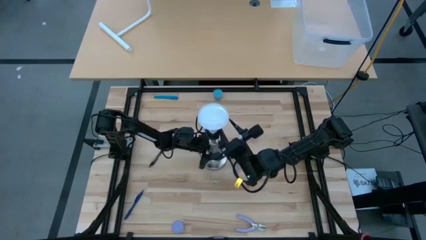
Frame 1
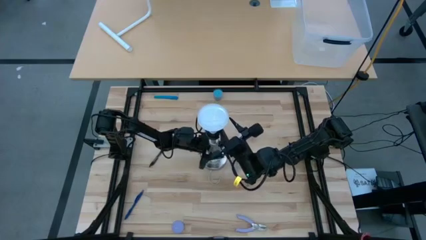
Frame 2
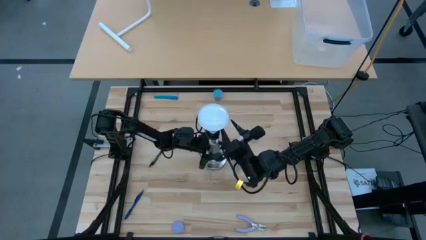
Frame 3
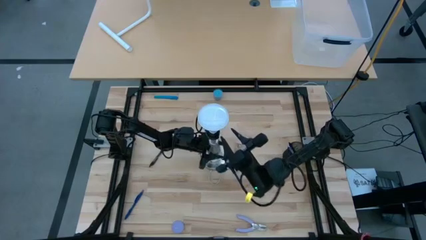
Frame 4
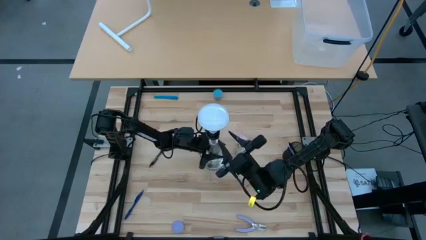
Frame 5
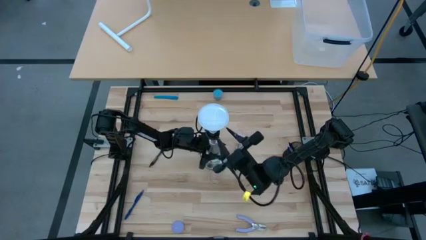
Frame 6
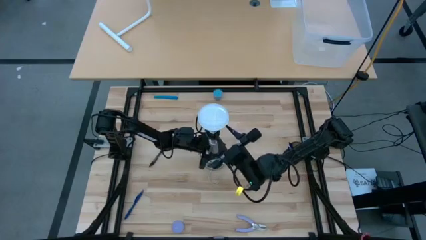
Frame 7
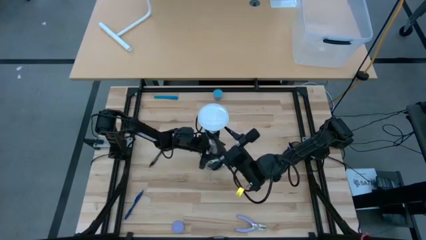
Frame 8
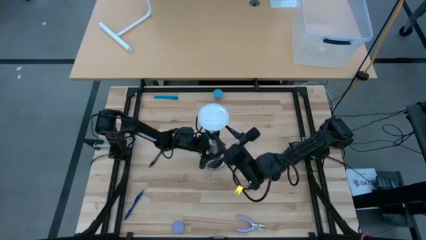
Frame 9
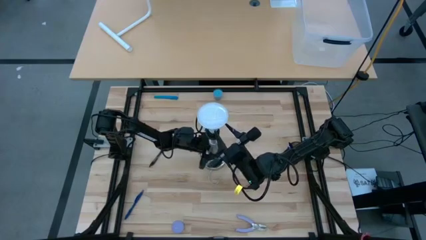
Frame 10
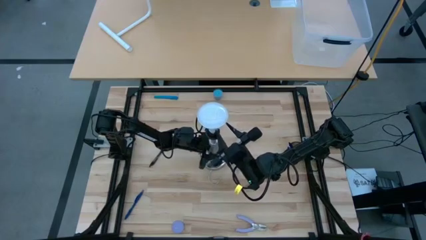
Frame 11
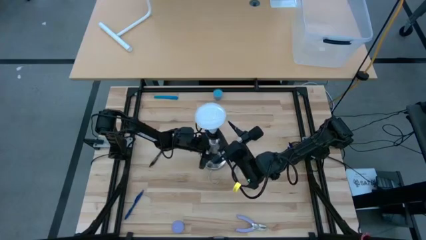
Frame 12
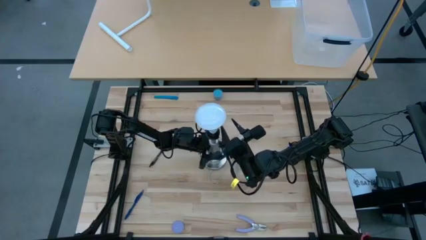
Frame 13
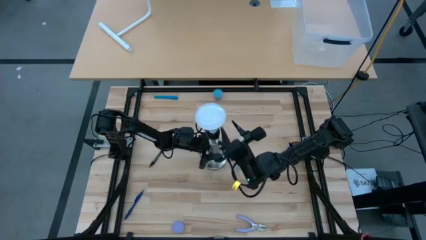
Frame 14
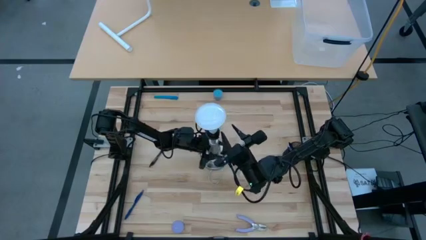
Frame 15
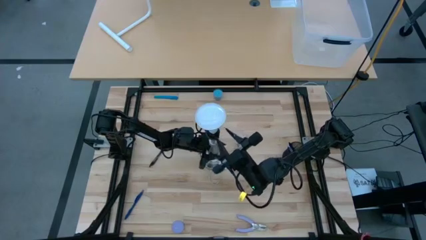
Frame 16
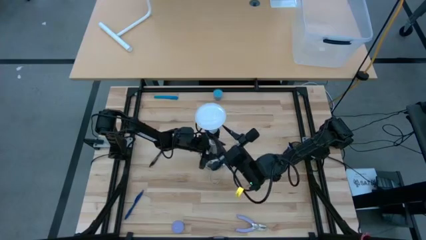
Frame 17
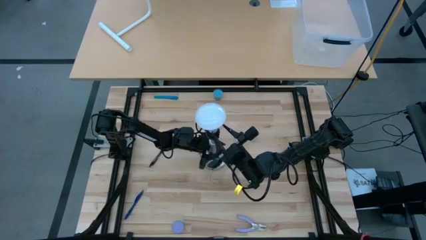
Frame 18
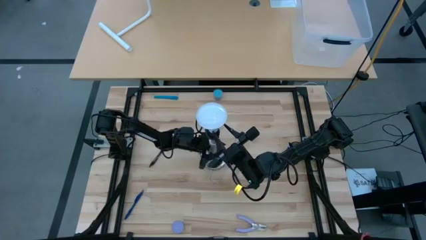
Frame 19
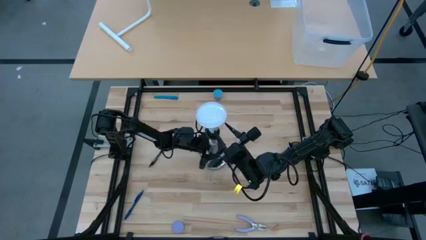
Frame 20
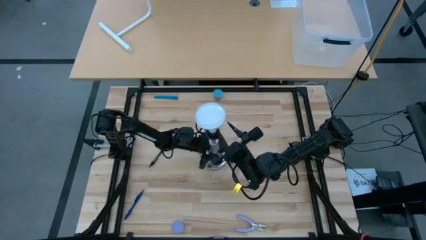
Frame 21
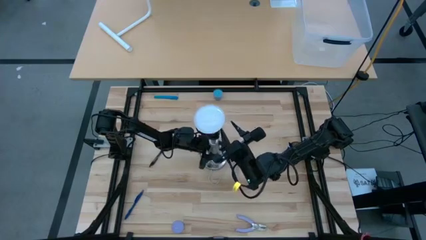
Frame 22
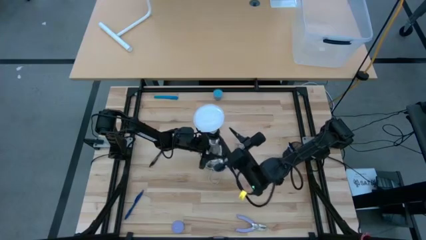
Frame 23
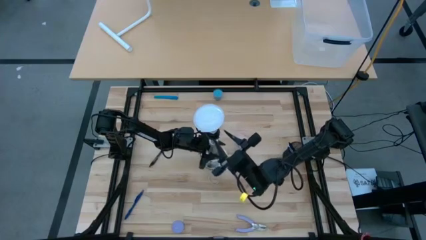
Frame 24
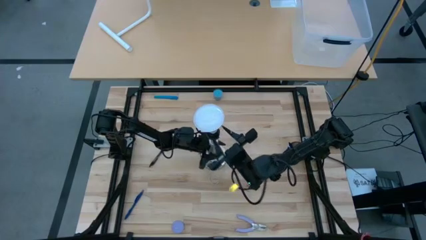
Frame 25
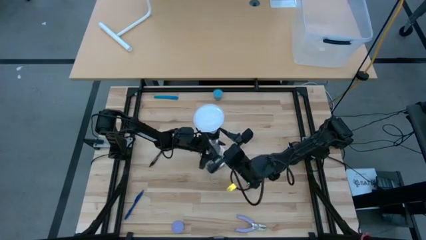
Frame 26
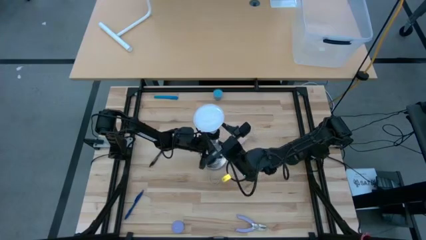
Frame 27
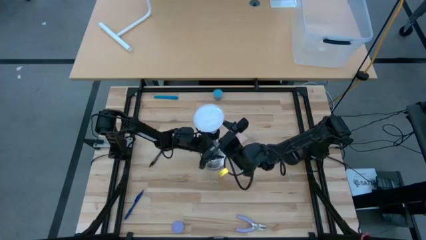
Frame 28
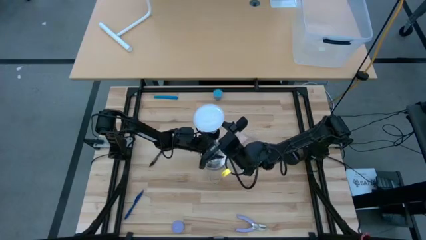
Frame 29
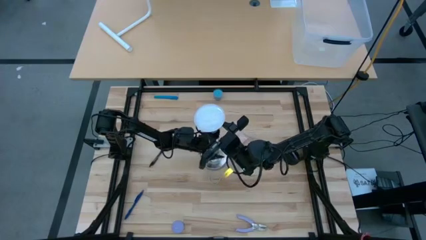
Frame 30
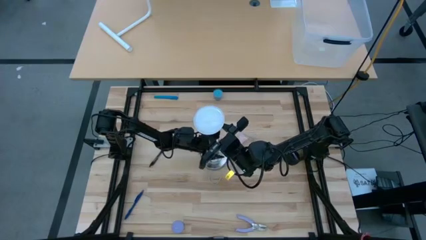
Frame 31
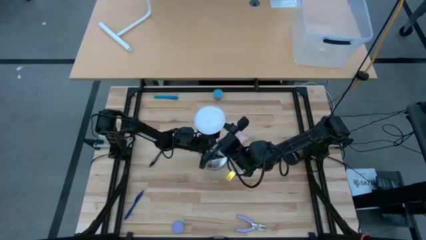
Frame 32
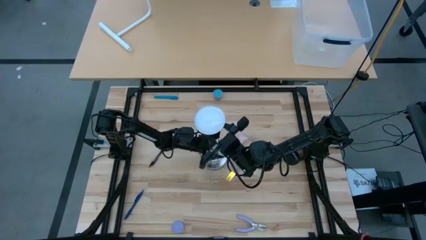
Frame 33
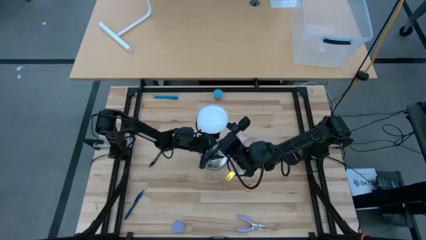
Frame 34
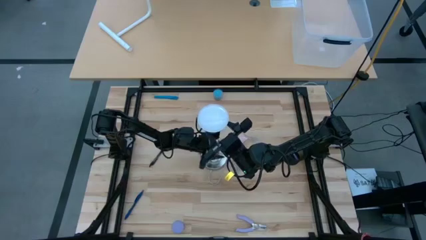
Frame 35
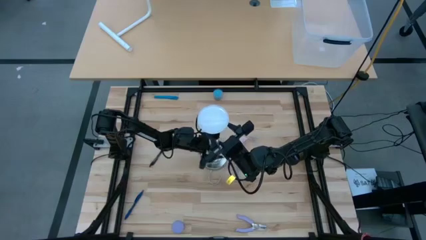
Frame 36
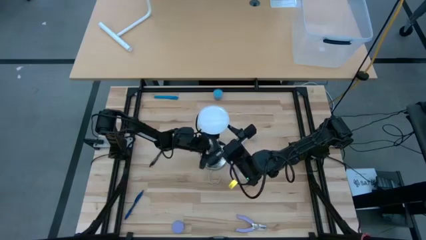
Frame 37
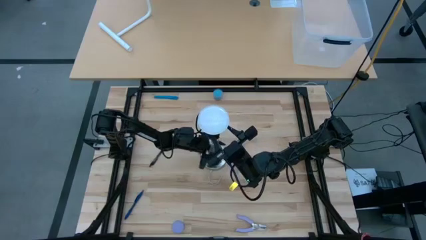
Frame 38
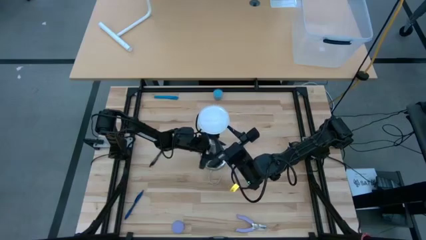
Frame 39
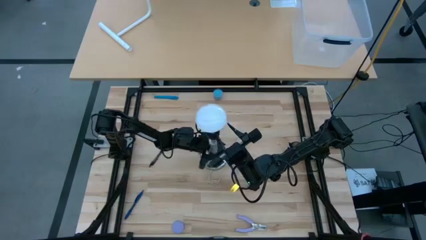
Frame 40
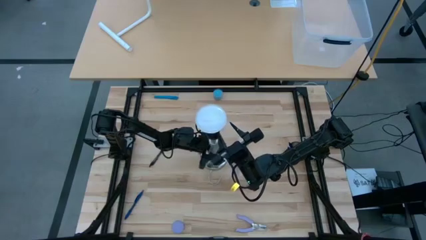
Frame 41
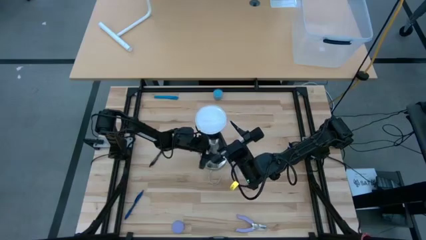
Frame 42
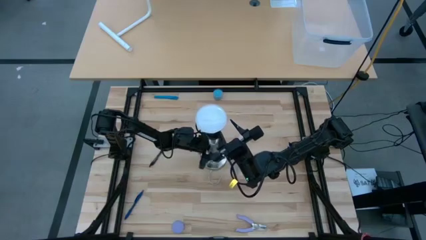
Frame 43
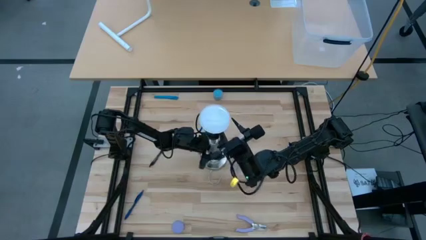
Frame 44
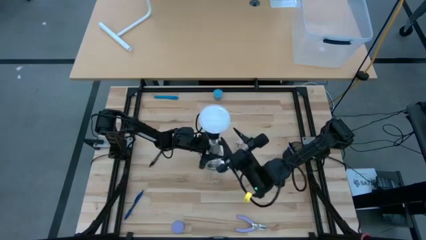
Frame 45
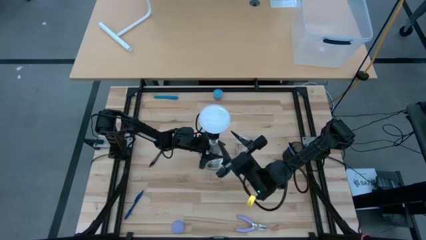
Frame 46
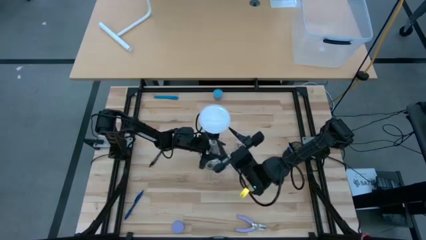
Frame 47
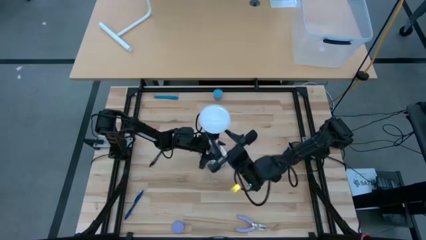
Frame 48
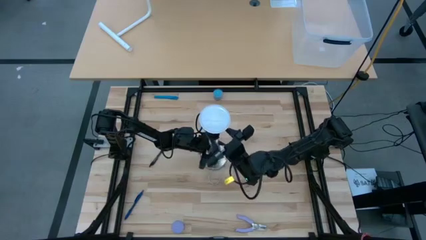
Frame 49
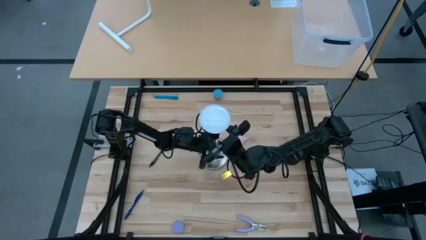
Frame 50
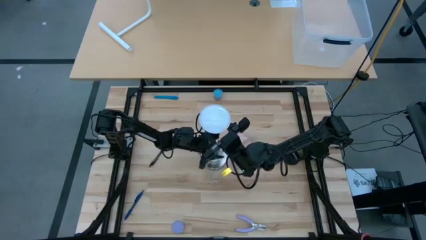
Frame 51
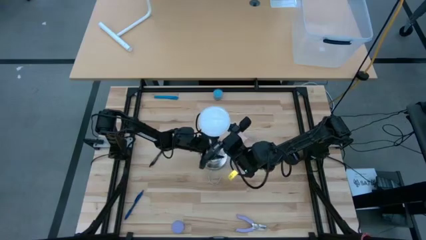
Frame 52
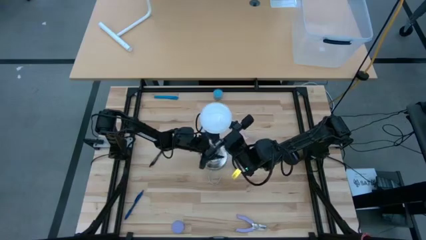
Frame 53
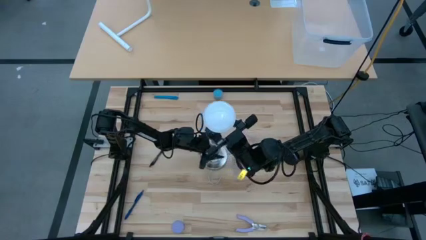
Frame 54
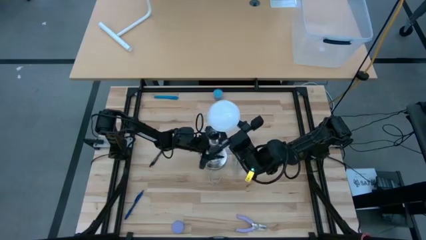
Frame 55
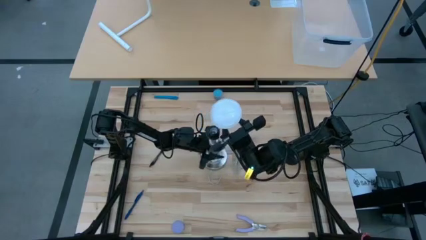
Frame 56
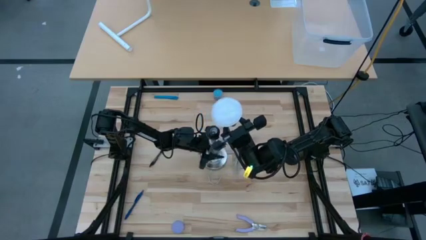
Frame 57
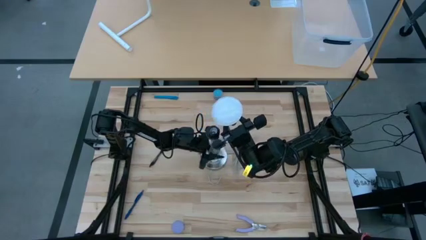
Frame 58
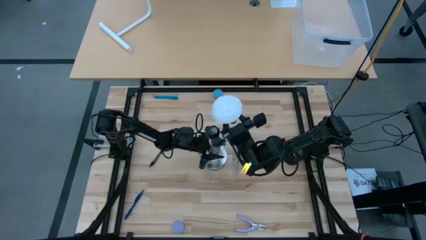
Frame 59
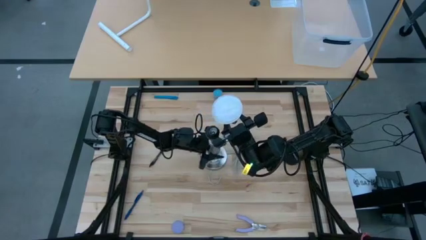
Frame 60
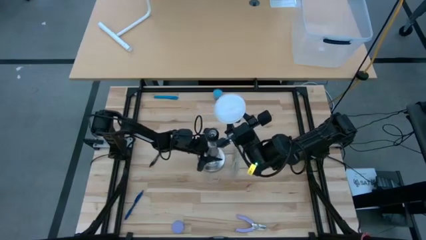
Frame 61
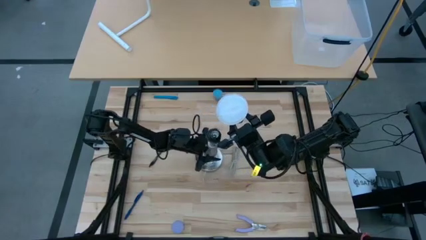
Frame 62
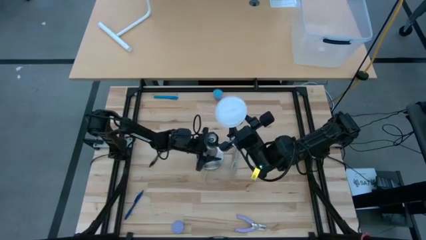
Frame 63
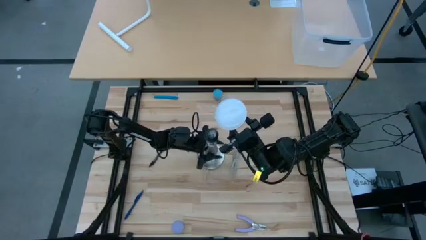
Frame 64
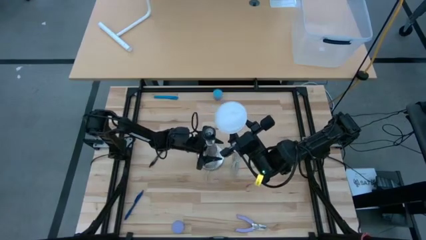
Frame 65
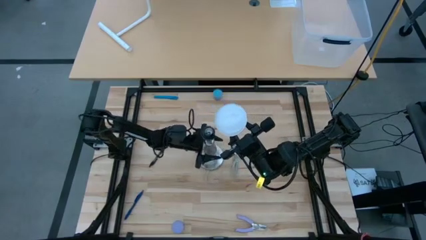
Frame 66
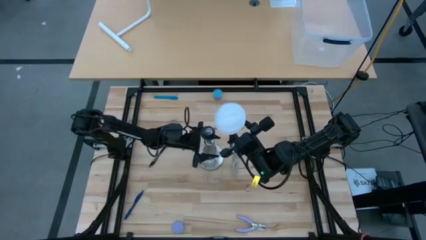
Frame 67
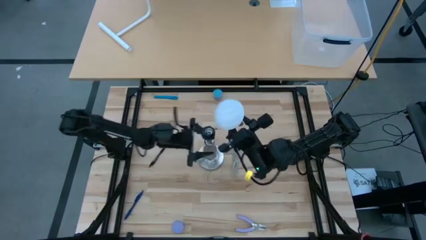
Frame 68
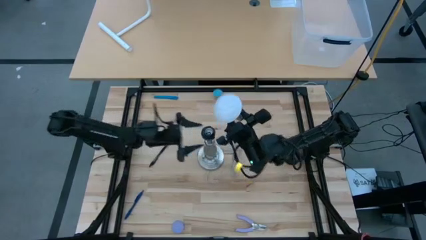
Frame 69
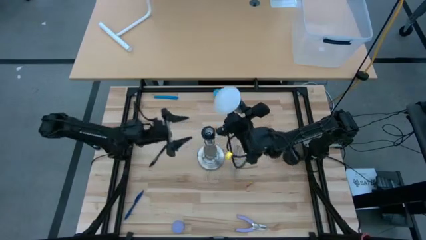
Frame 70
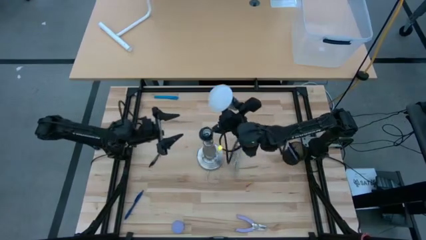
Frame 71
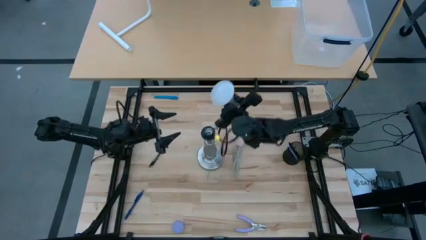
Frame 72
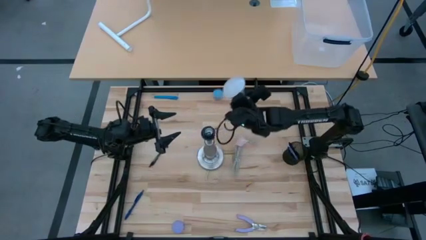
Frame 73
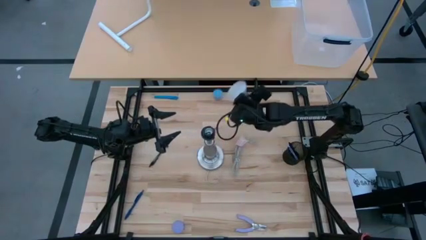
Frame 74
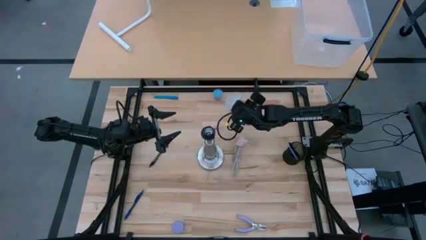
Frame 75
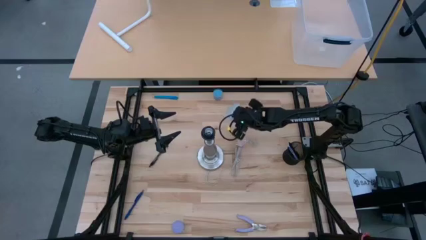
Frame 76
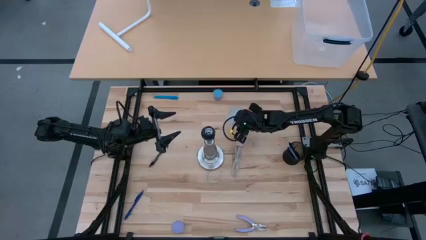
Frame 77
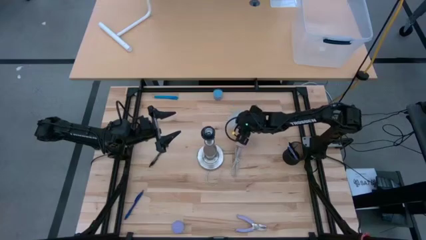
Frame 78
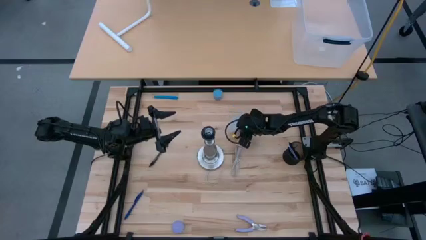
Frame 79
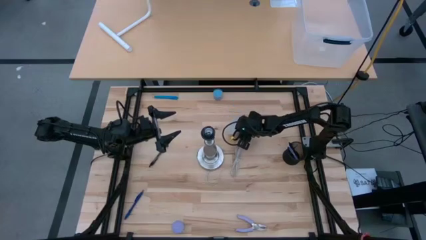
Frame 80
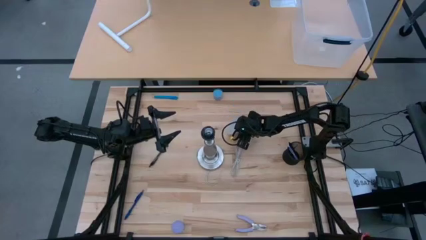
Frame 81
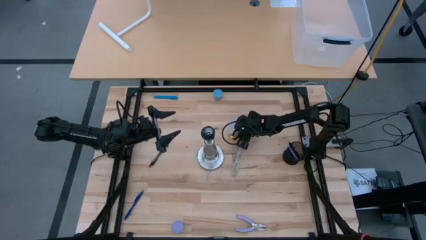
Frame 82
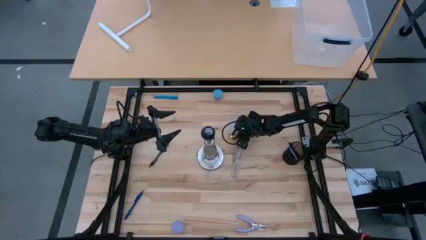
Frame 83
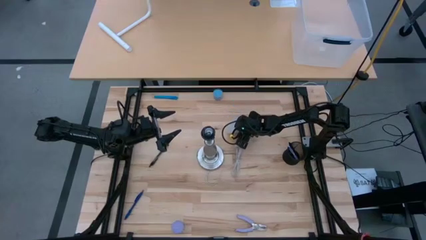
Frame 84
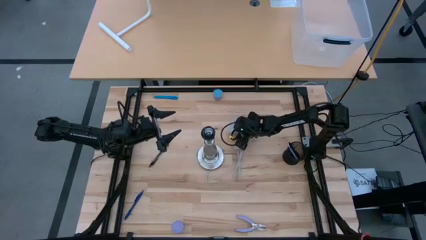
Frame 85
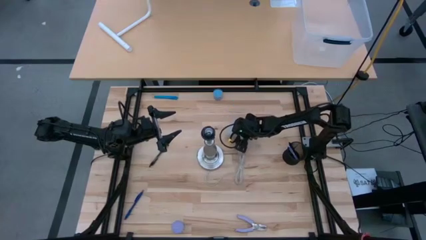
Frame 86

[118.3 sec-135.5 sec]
Task: Screw lightbulb
Remove the lightbulb from the lamp
